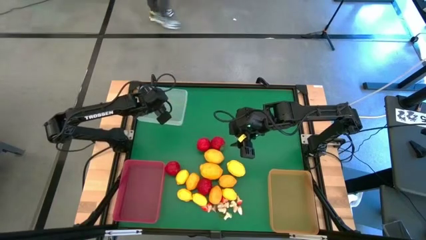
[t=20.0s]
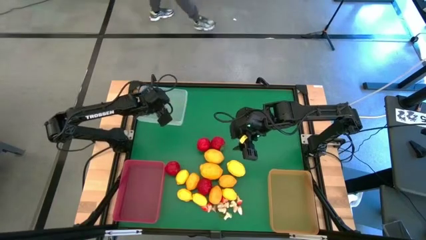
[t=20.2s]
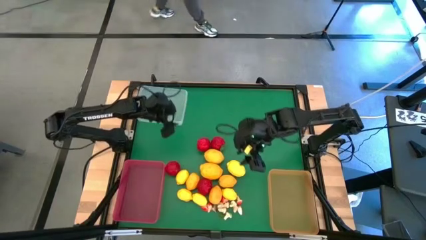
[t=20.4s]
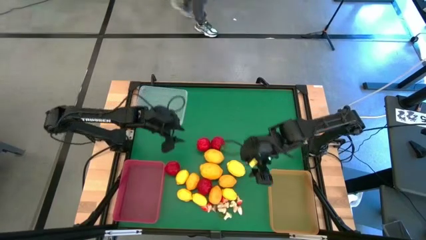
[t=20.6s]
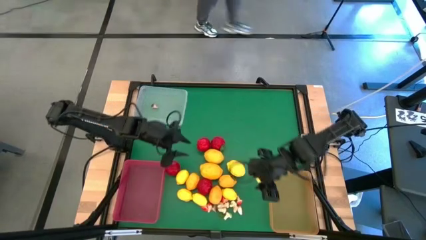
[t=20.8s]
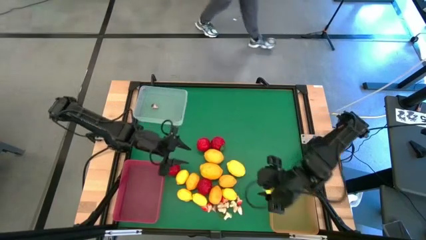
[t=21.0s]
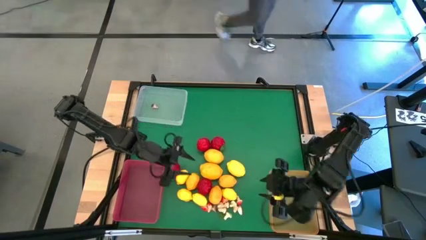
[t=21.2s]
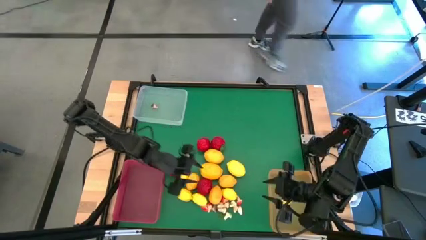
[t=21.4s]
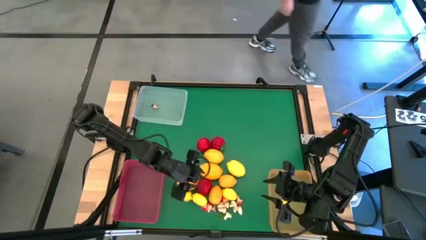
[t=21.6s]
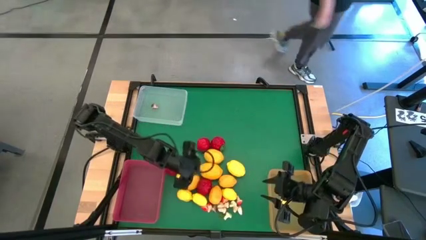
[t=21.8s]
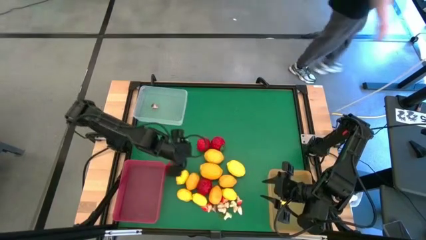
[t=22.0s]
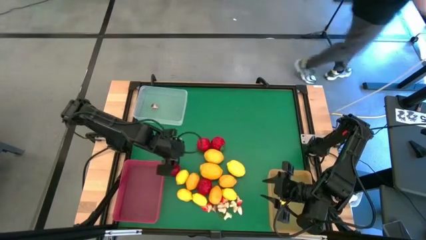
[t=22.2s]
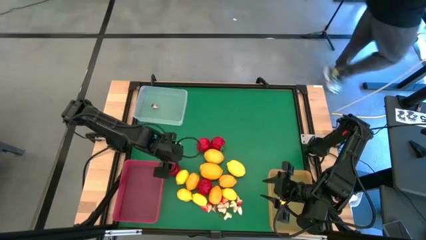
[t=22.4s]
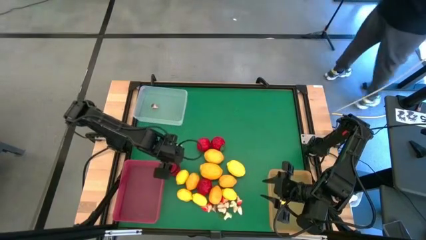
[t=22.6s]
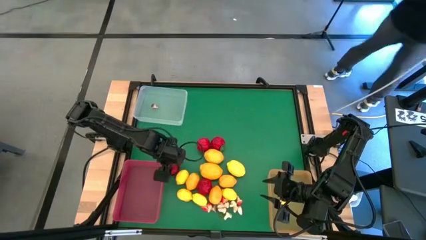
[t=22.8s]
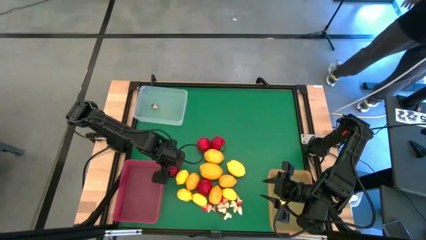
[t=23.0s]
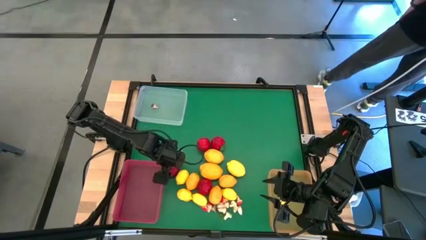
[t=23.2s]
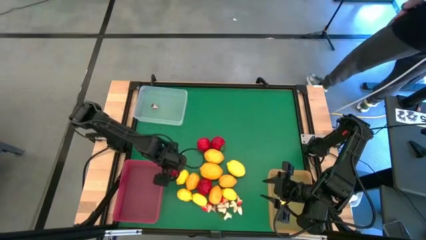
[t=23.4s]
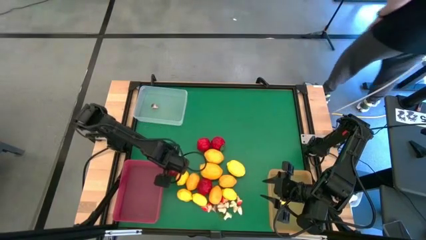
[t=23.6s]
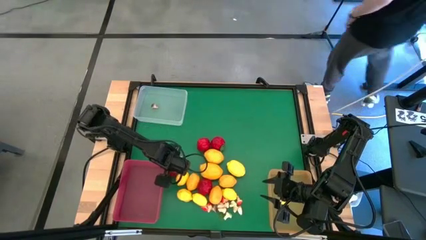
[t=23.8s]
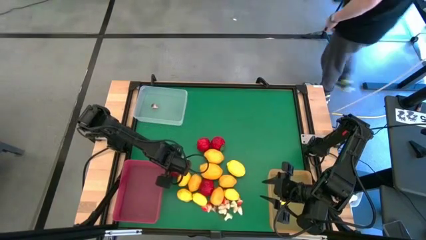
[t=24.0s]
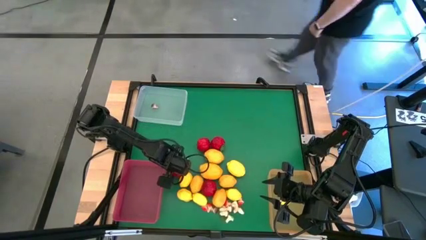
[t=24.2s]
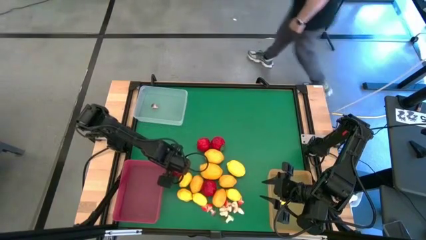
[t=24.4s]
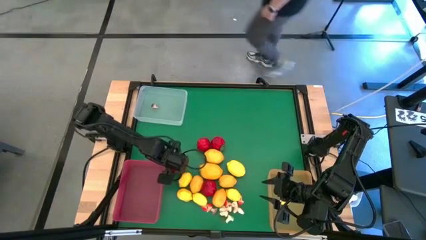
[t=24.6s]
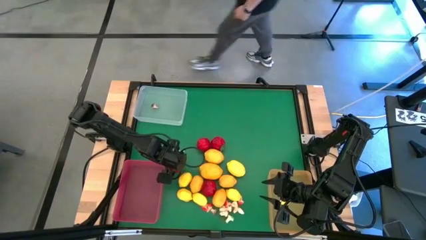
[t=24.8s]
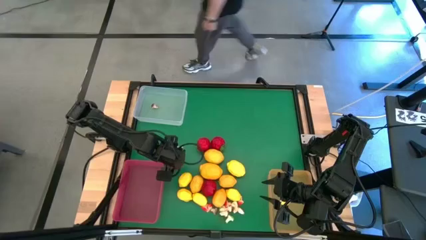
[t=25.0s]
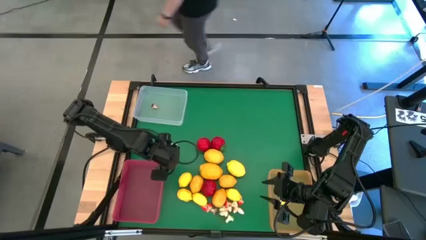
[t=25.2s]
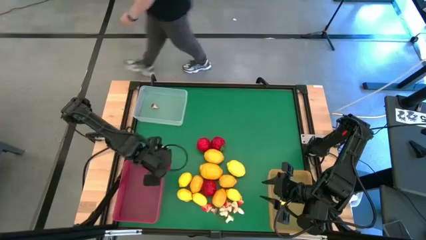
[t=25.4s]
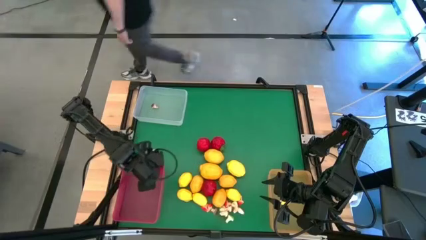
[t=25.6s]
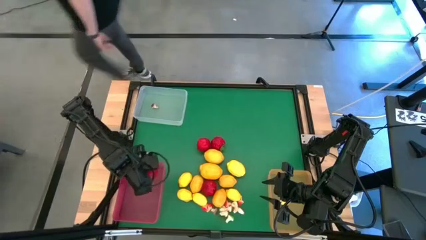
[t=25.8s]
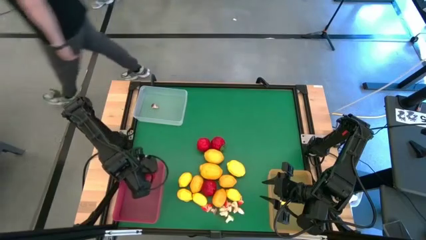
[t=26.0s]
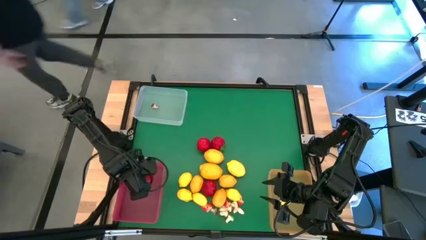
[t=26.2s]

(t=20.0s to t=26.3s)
Task: Sort produce into baskets
Put the red tomato into the red bin

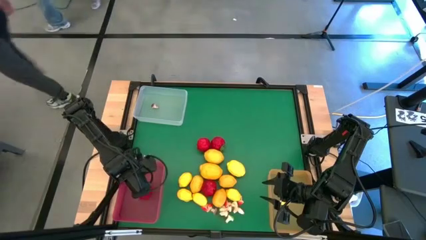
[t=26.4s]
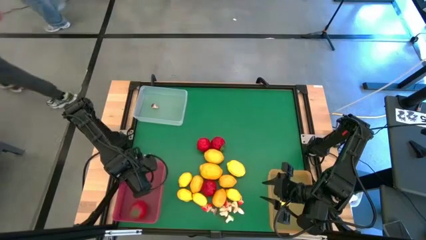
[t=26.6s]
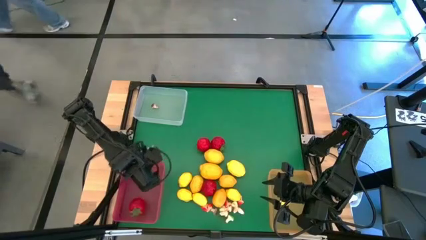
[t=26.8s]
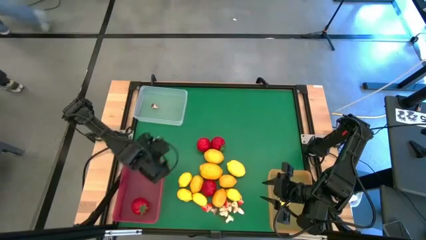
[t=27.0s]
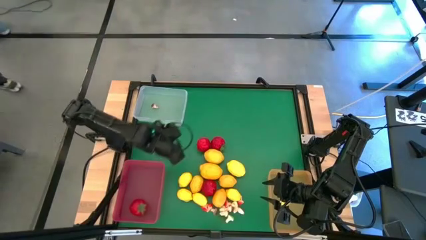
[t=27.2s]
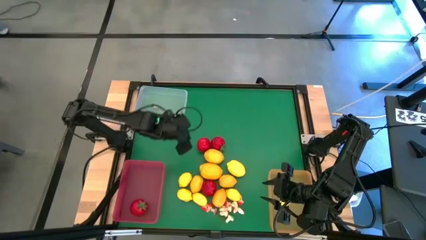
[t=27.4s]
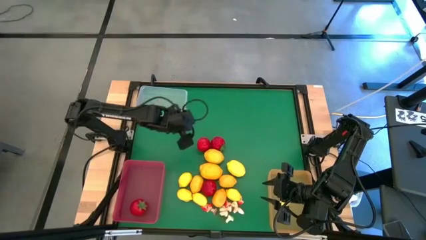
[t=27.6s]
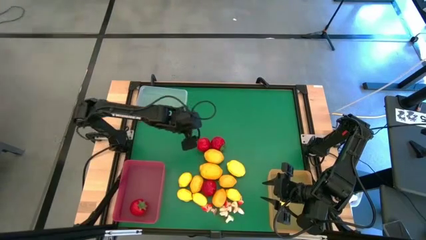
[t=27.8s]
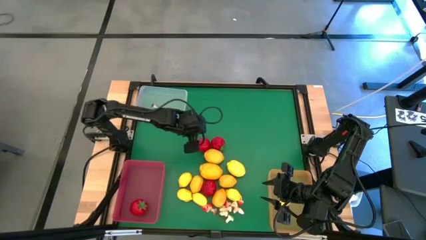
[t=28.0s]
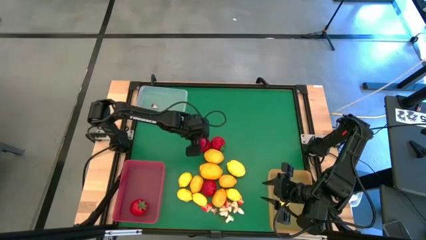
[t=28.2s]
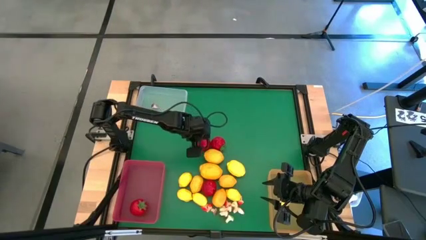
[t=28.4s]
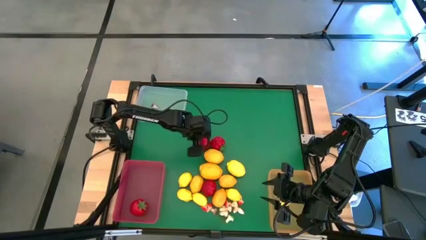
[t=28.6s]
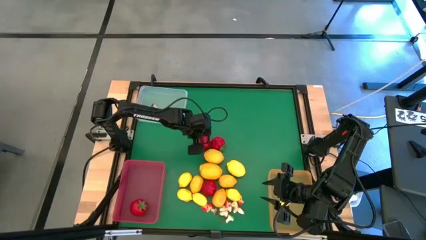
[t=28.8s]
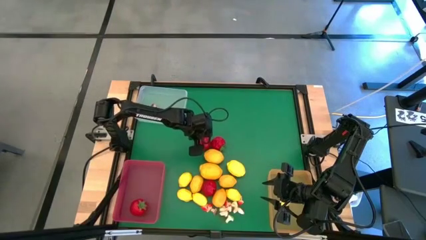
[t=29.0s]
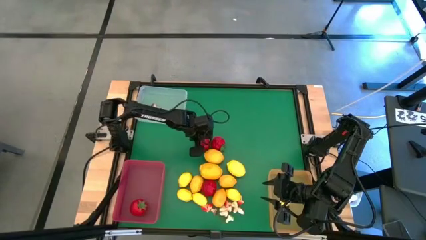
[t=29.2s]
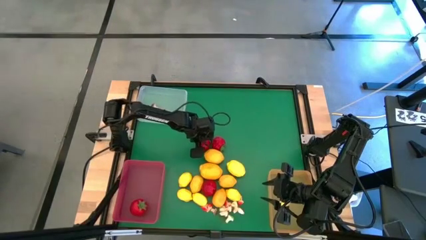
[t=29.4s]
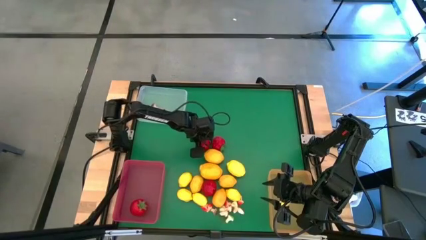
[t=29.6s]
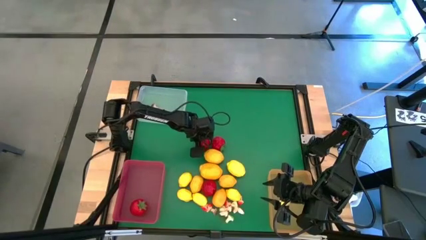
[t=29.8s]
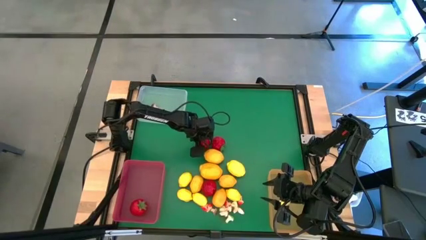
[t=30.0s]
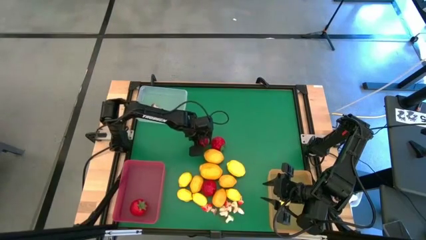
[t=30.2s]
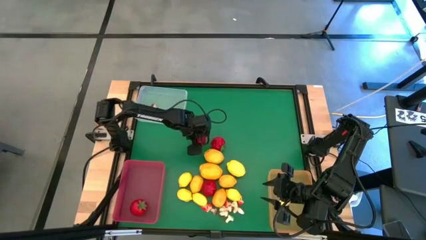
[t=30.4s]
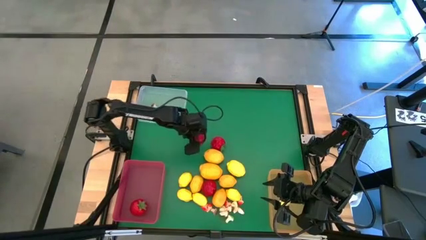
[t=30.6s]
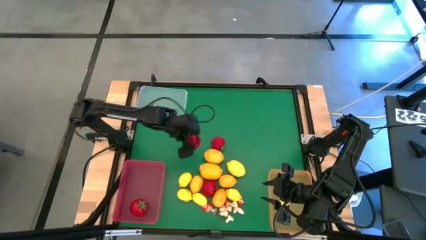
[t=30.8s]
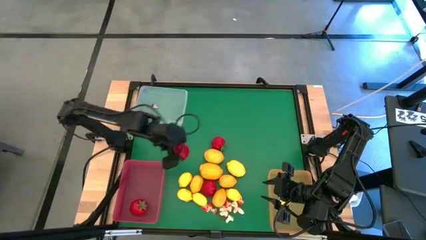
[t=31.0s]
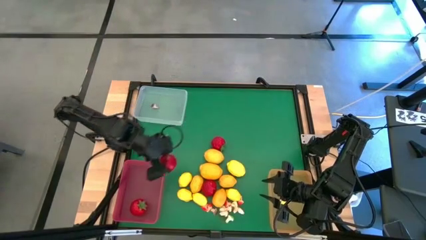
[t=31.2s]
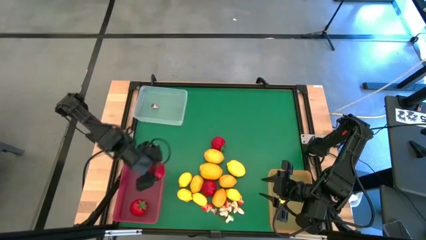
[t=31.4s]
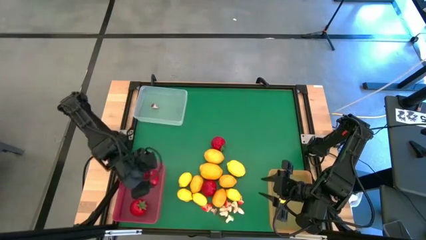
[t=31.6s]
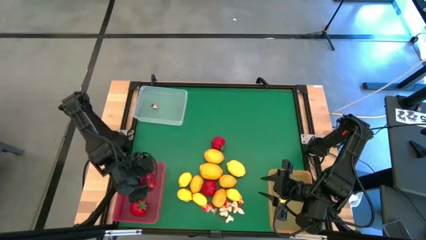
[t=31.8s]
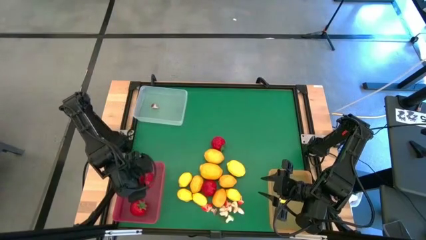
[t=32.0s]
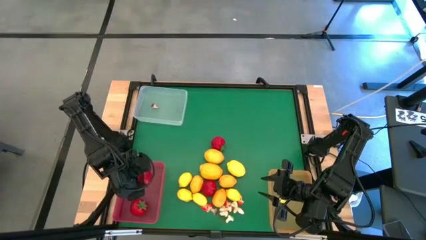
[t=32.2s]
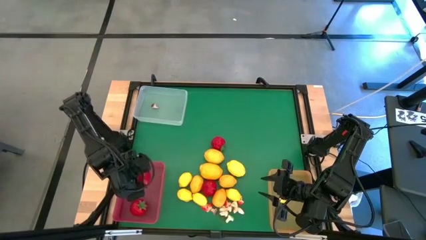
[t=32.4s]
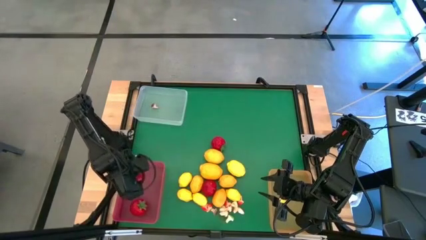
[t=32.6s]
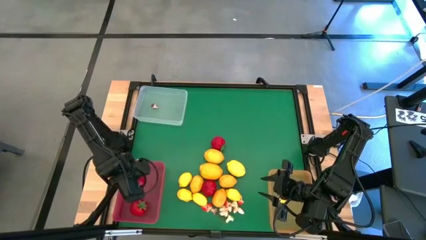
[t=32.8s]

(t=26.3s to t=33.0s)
Put the red tomato into the red bin

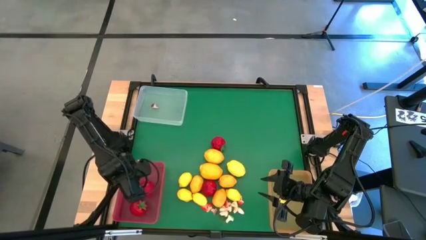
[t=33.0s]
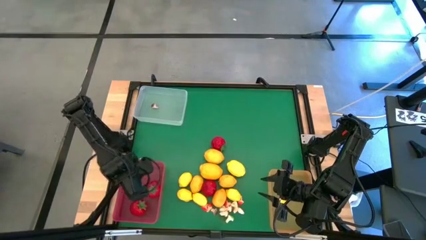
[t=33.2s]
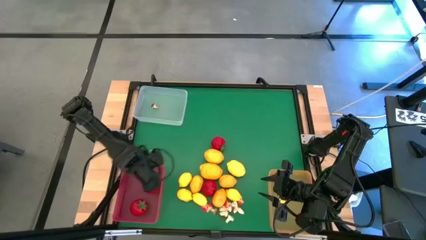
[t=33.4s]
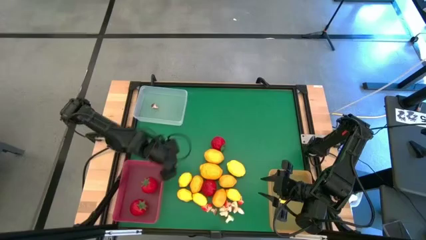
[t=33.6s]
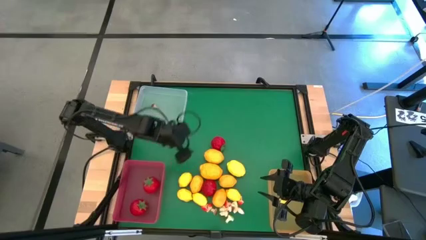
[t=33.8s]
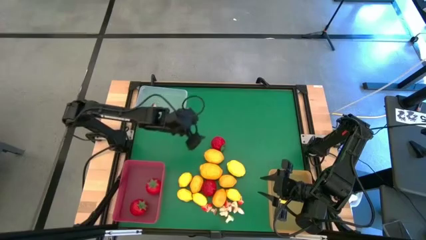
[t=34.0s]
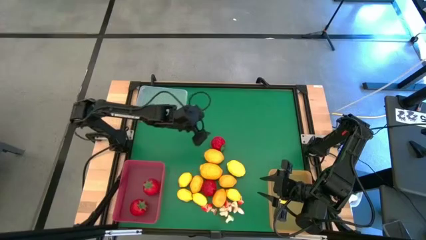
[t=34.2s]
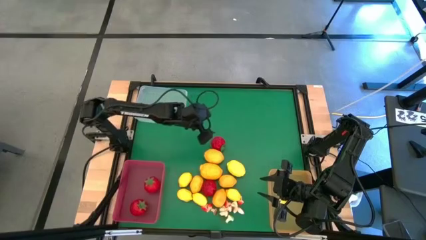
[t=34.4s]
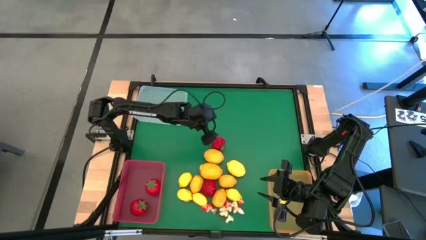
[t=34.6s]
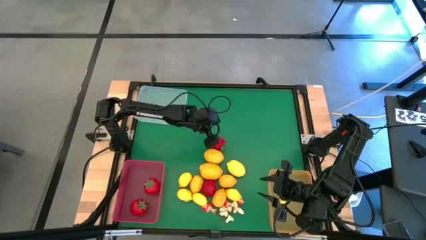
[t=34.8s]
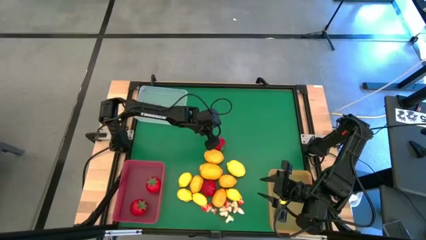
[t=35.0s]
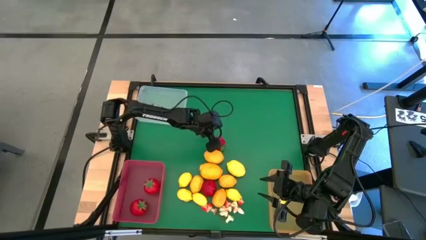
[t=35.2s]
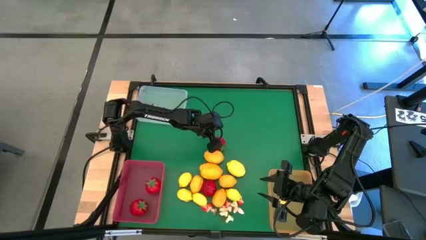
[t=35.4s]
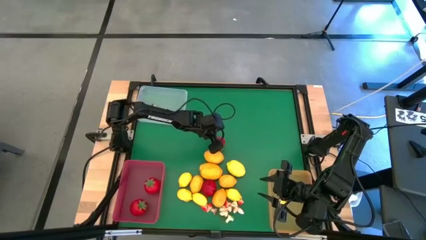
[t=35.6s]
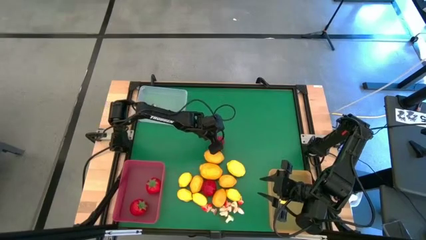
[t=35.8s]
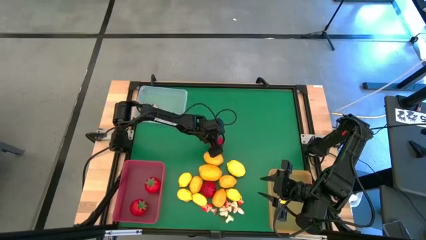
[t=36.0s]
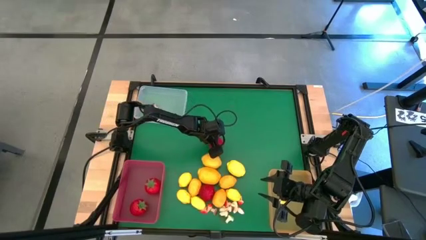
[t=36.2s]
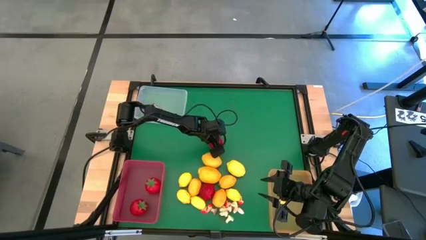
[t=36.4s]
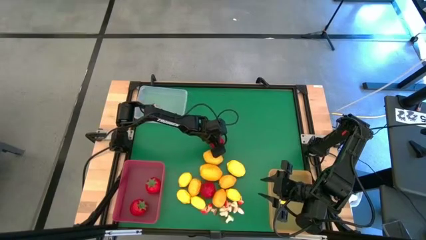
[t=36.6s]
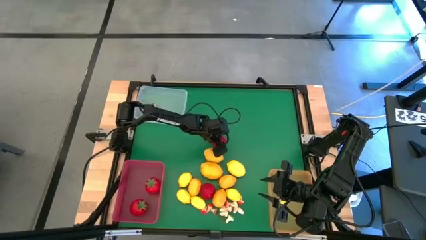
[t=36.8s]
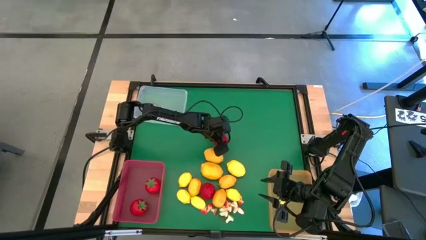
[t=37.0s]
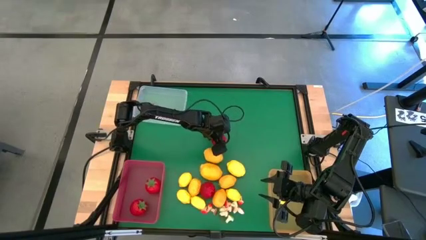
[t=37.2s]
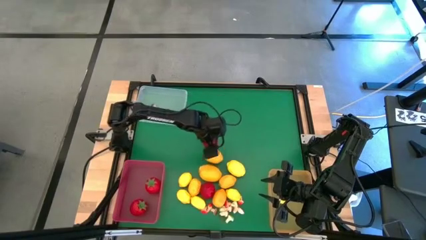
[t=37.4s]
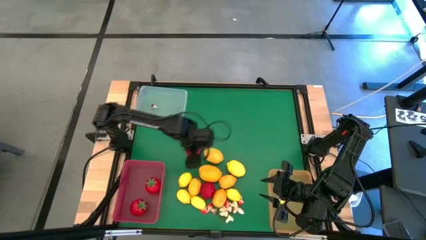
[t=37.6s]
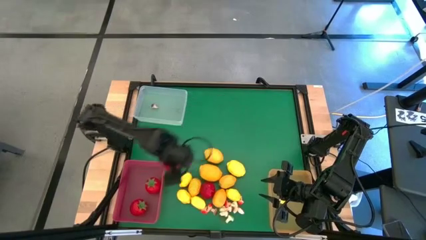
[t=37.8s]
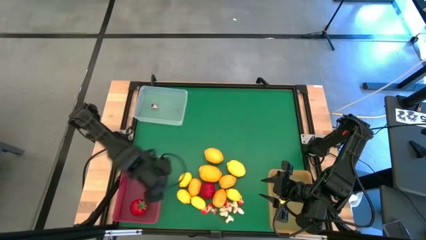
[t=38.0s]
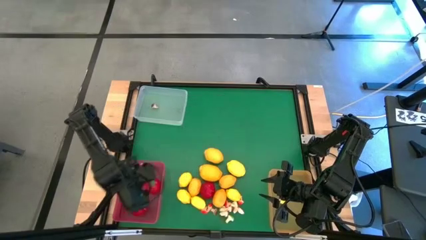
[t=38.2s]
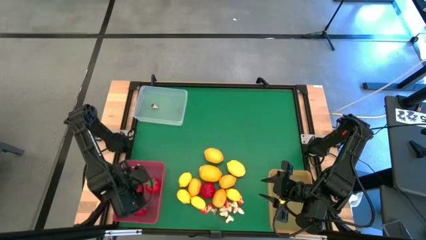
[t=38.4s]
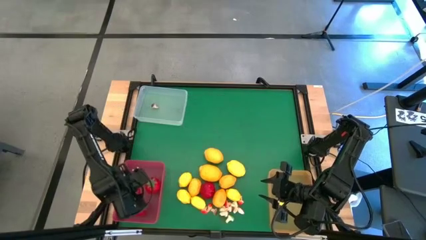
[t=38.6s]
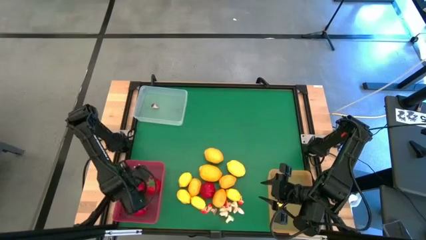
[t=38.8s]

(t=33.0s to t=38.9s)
Put the red tomato into the red bin
